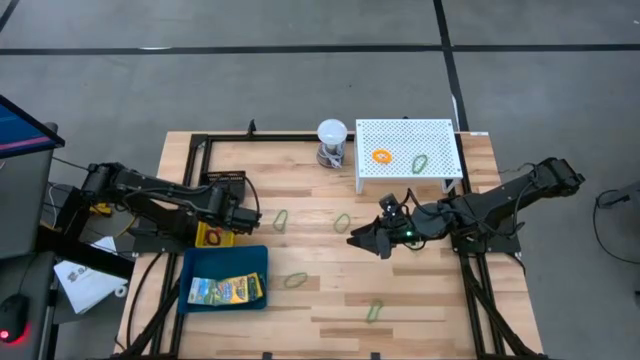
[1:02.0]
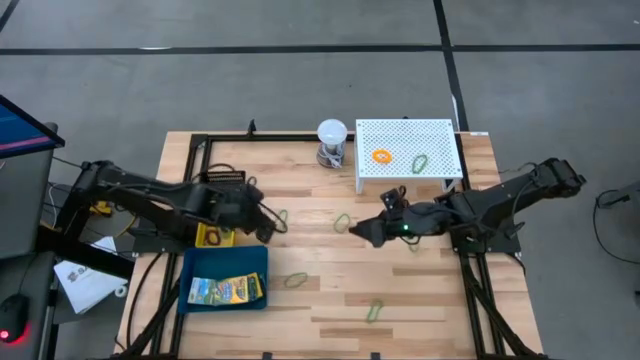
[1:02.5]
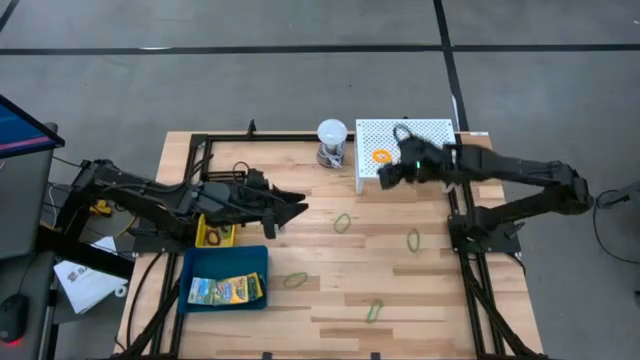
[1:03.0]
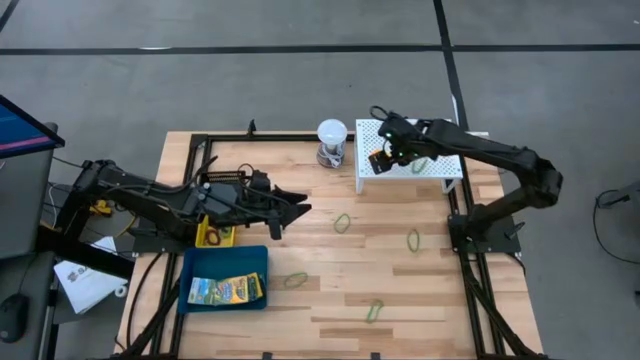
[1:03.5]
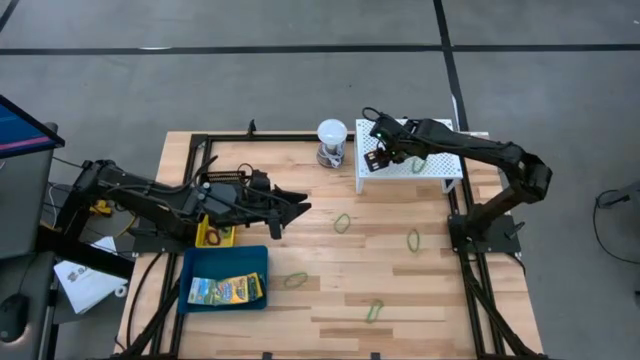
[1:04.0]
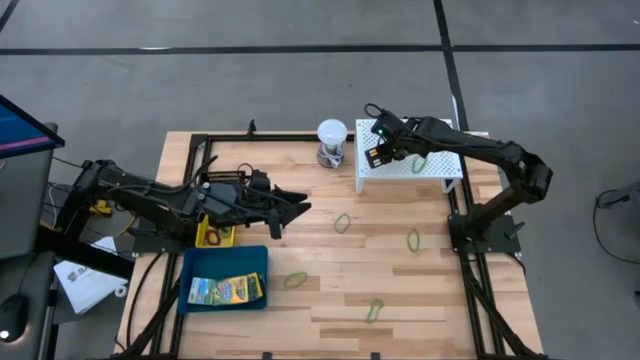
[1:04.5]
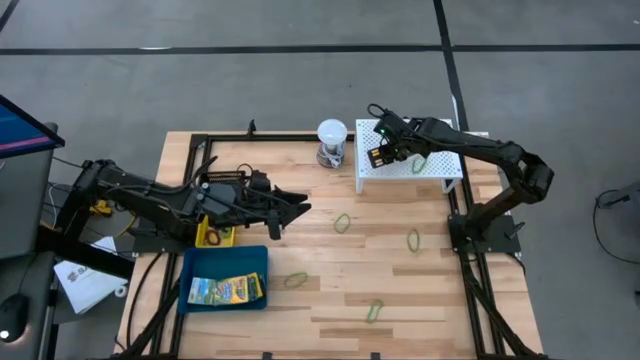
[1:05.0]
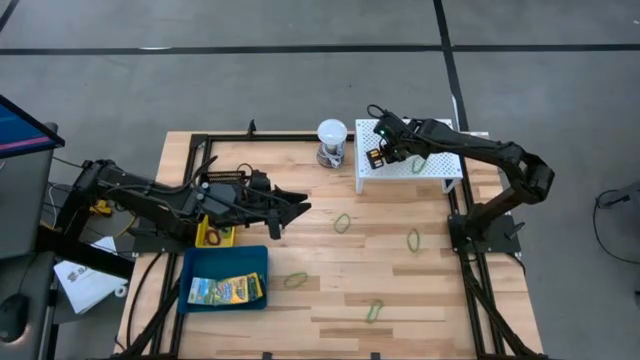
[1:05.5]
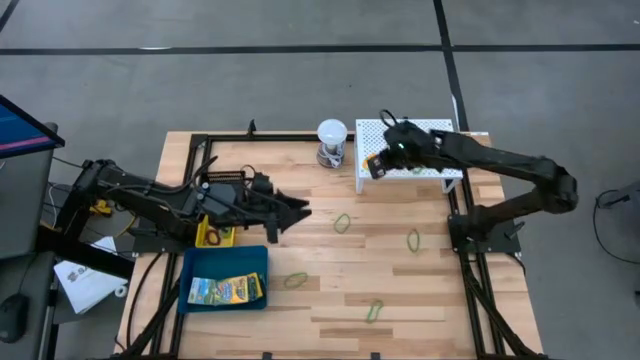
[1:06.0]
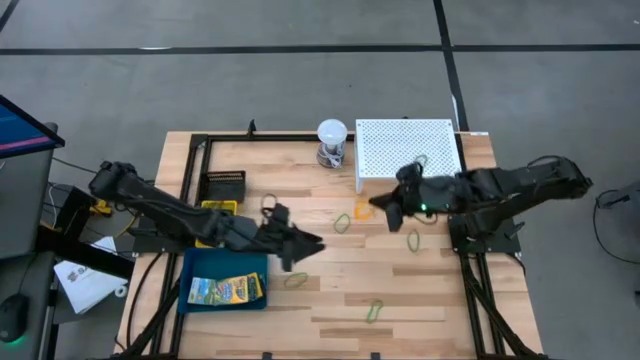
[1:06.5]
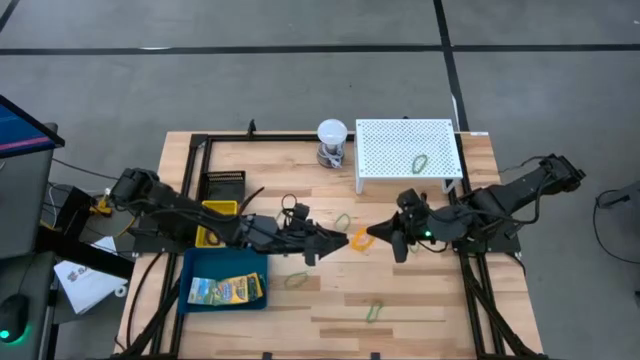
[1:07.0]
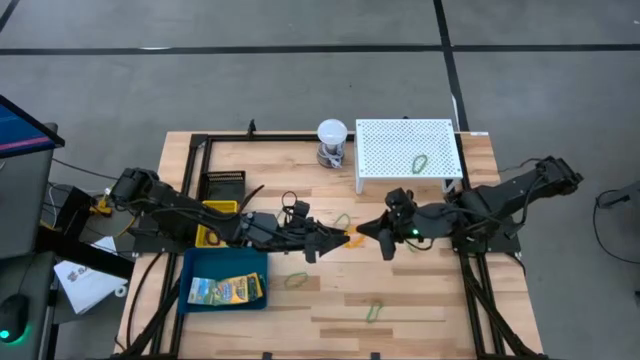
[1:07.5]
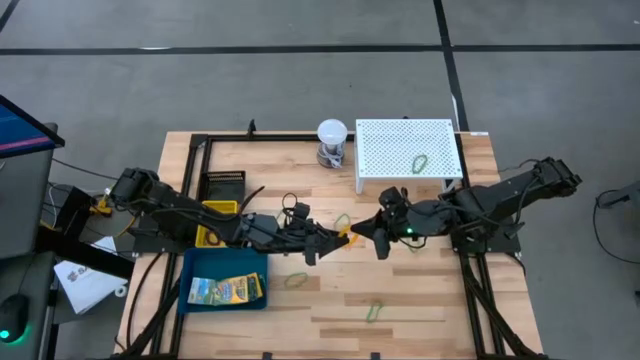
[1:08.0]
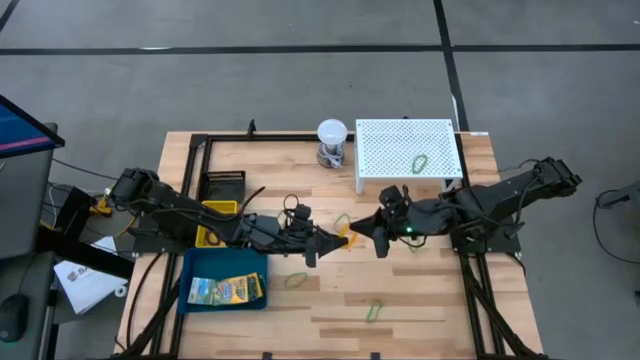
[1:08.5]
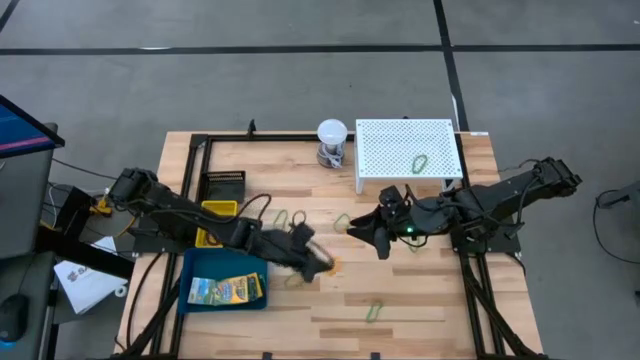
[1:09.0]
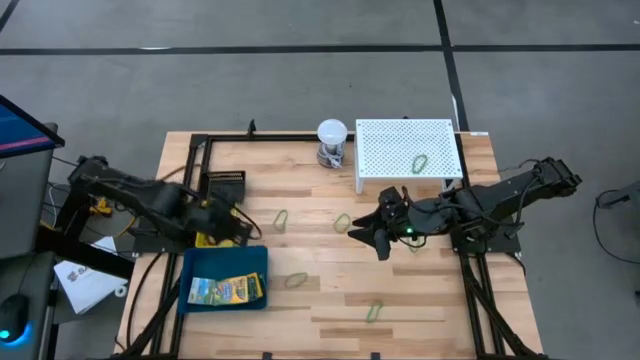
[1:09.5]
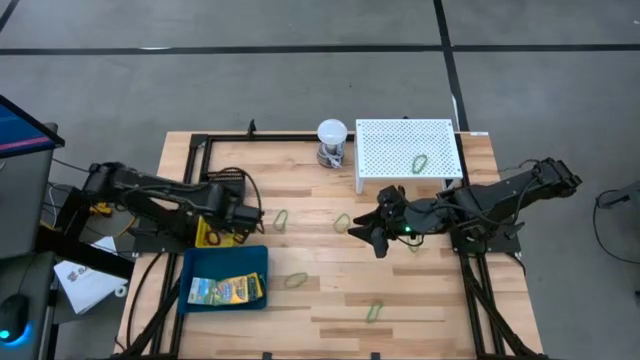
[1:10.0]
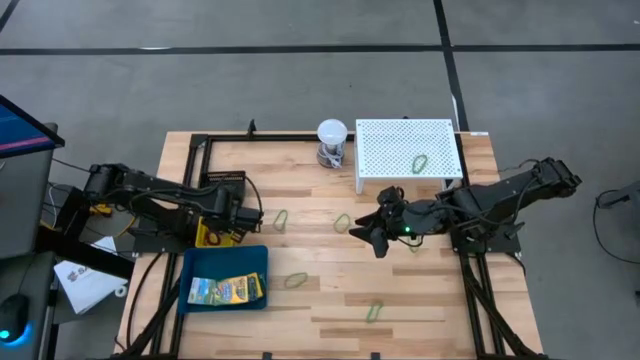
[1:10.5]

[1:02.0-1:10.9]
Task: Pick & Place Office Desk Supplies
Put the yellow spring keychain into the yellow bin

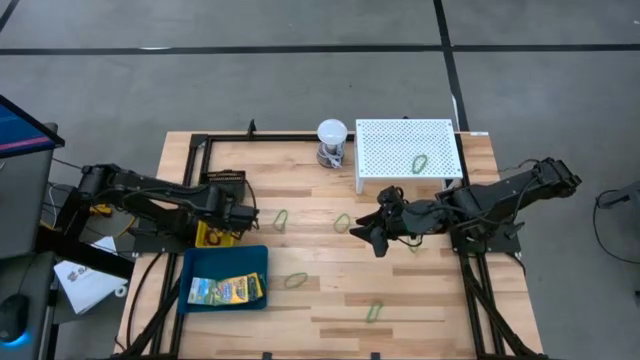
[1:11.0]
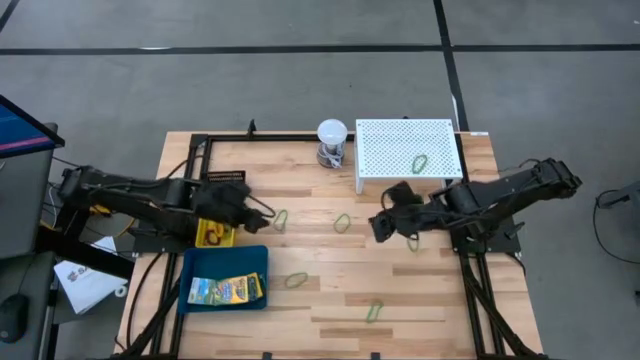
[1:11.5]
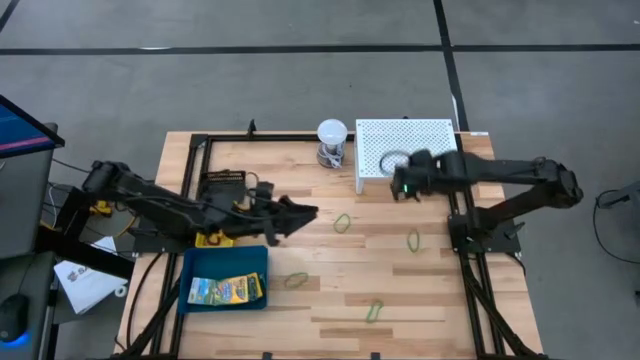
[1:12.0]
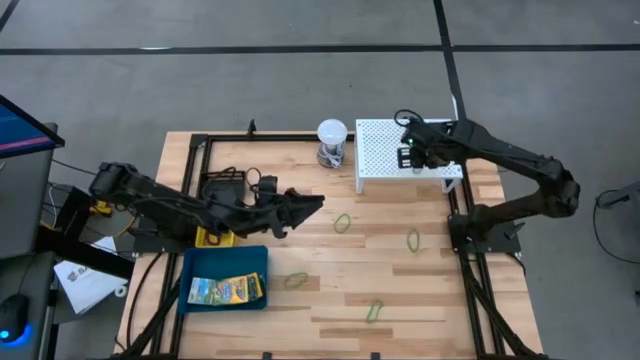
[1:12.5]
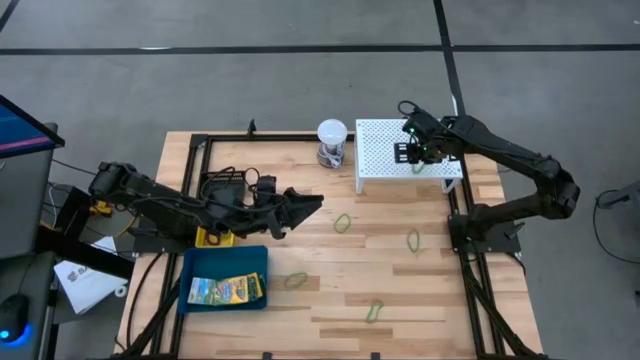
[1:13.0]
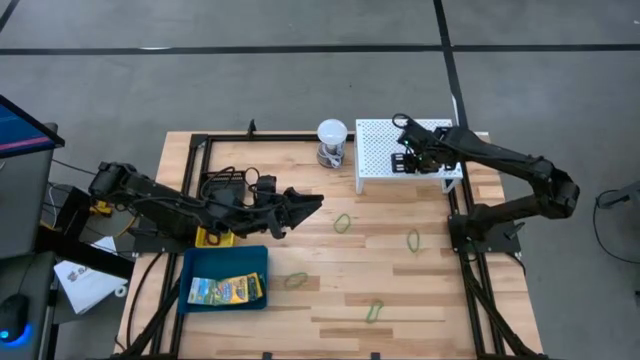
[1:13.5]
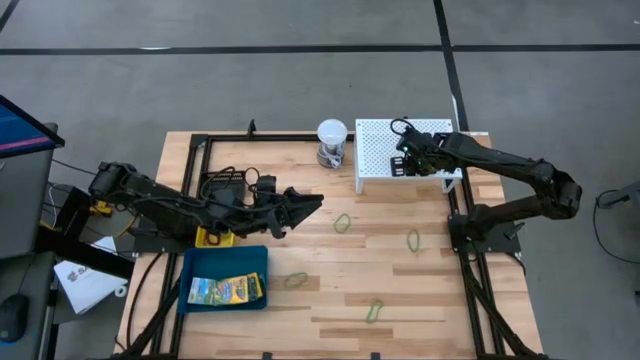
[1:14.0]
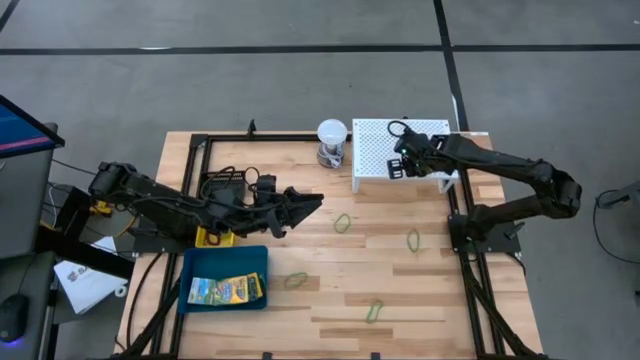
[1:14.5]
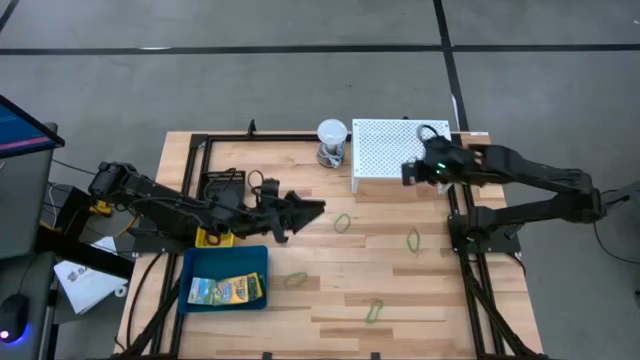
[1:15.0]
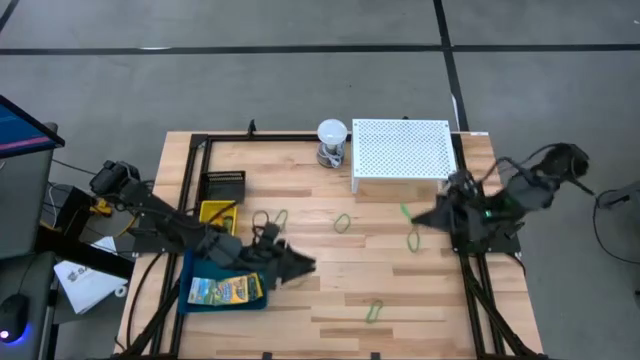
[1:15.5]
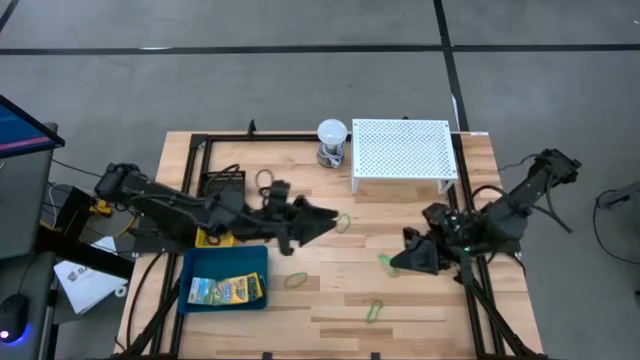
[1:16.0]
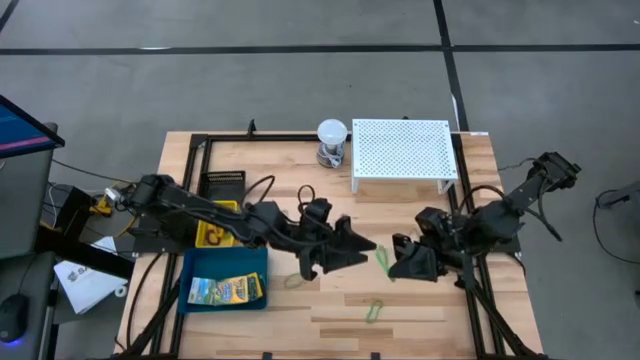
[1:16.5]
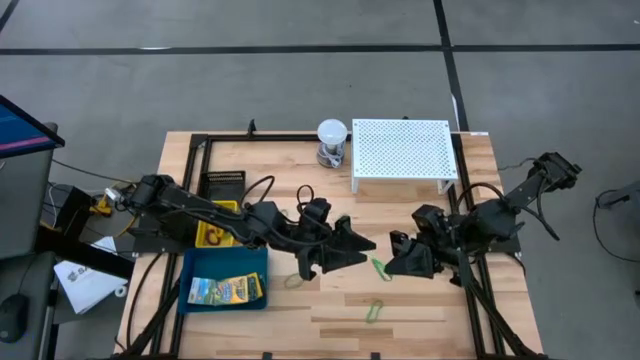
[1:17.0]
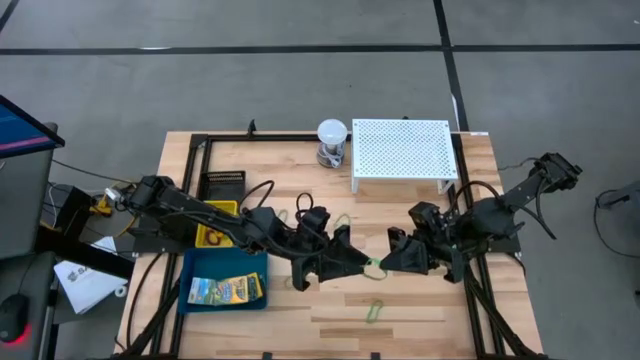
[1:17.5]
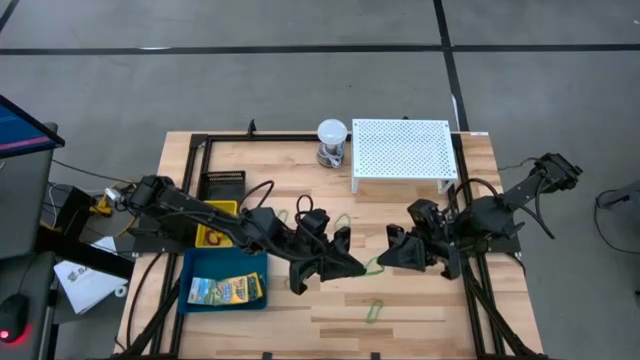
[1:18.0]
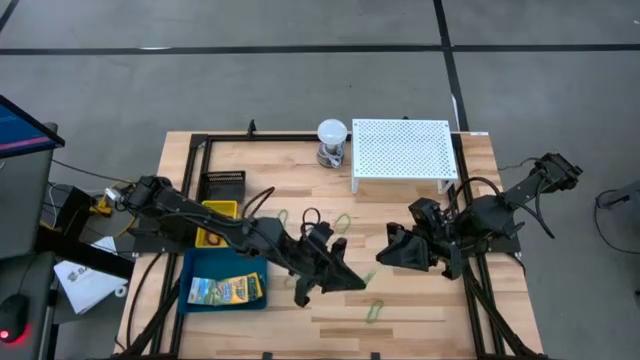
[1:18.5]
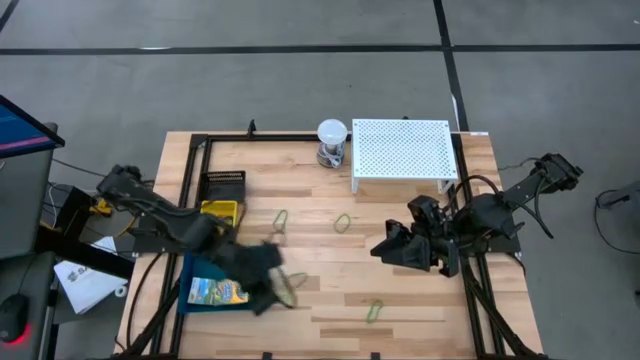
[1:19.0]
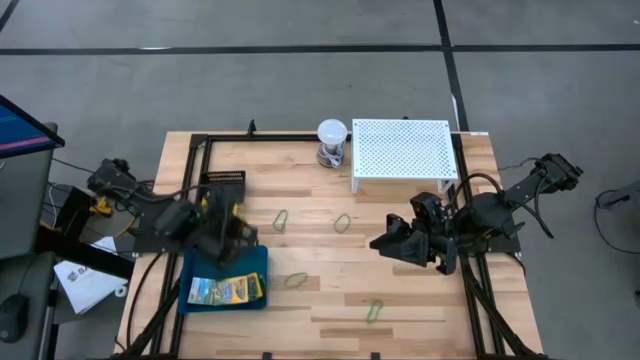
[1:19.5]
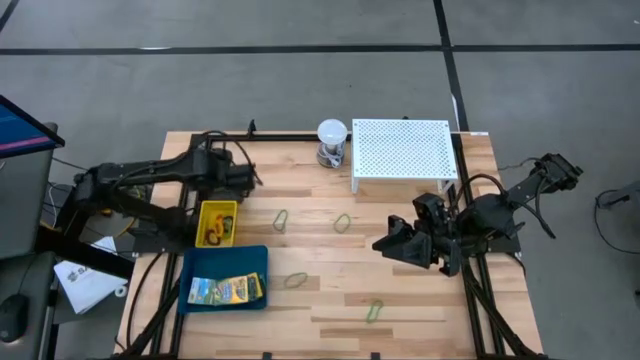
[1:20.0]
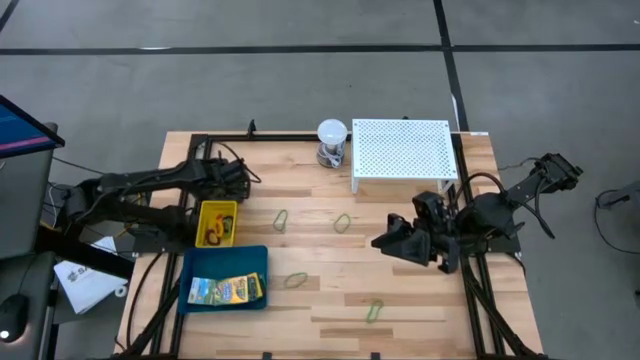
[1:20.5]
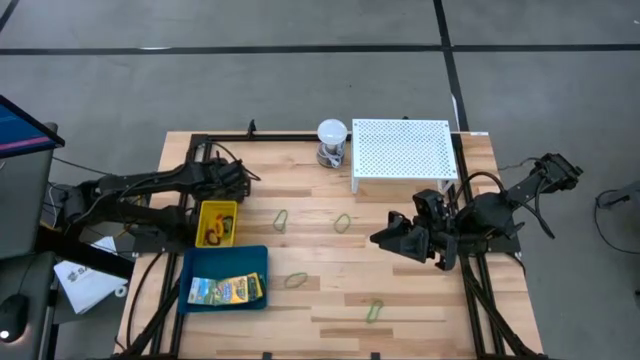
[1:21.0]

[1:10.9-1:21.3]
Put the rubber band from the shelf into the black bin

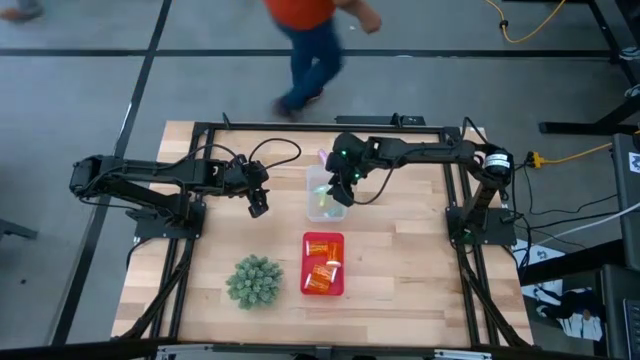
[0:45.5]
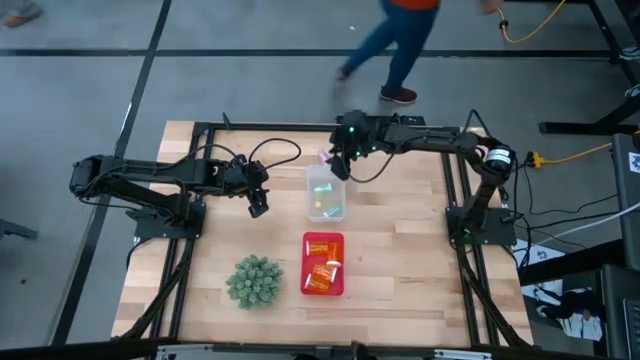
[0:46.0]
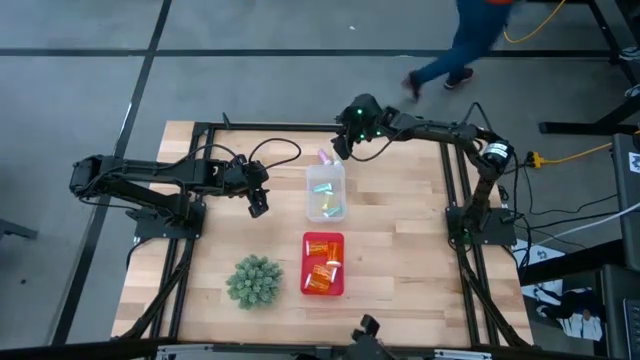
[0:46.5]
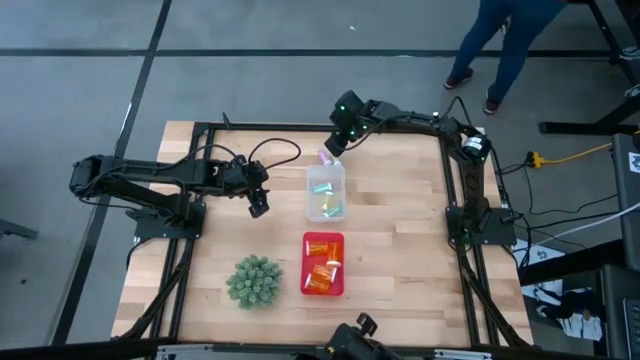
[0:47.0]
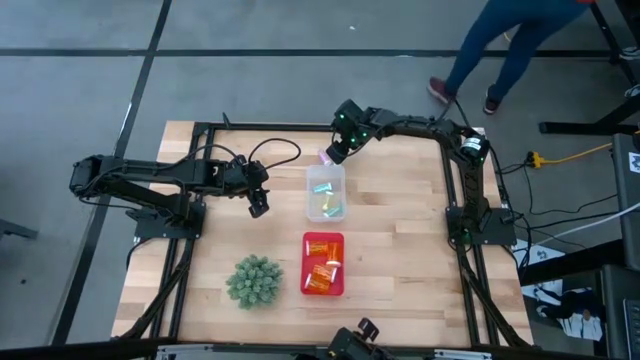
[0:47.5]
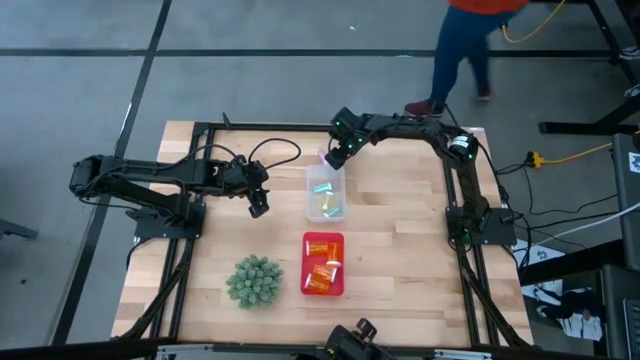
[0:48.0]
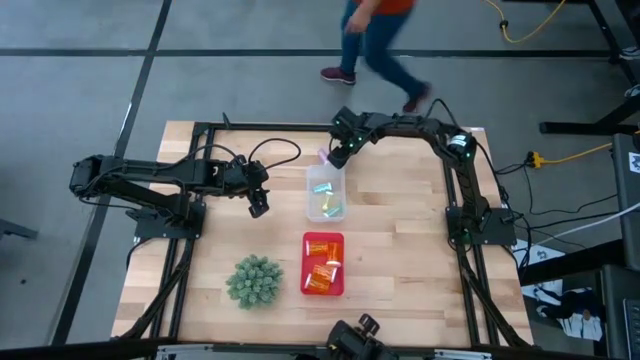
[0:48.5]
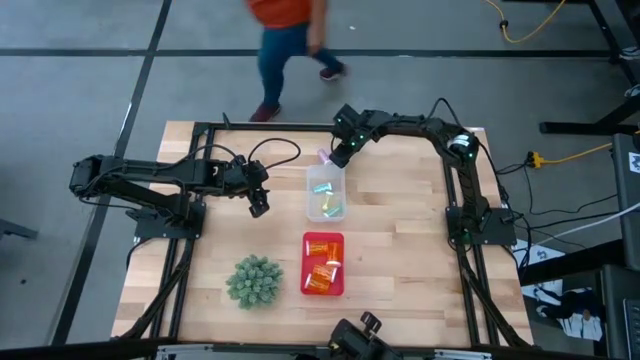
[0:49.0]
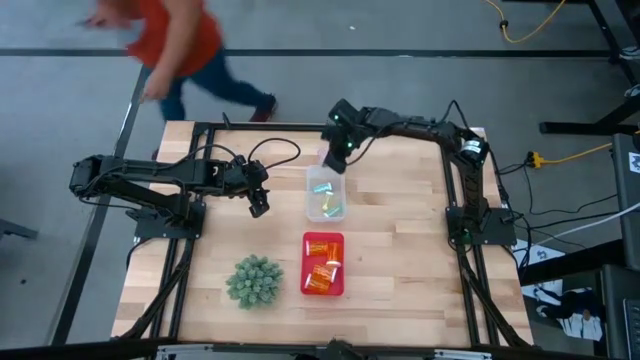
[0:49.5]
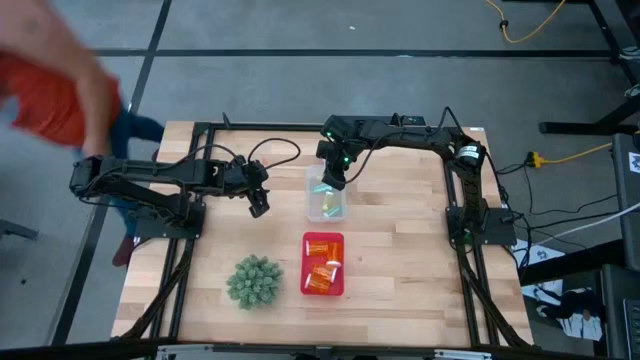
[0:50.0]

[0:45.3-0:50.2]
Task: Pick and place medicine bottles into bin by pill shape (circle, oval)
Put the small yellow pill bottle into the transparent bin
